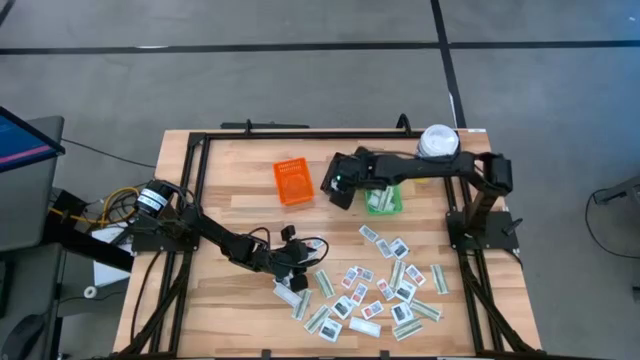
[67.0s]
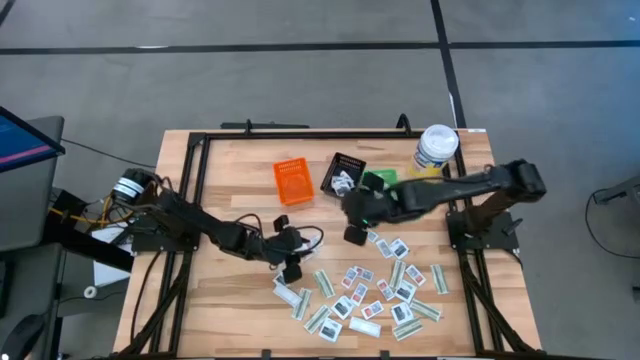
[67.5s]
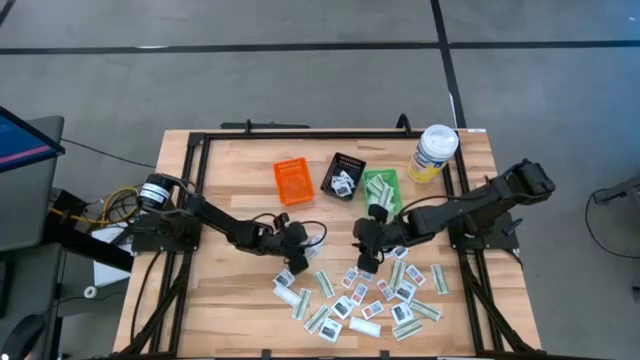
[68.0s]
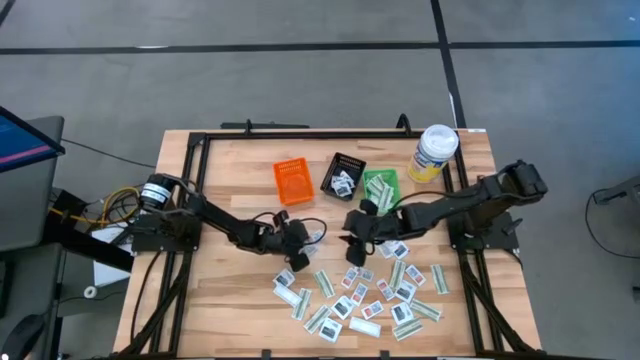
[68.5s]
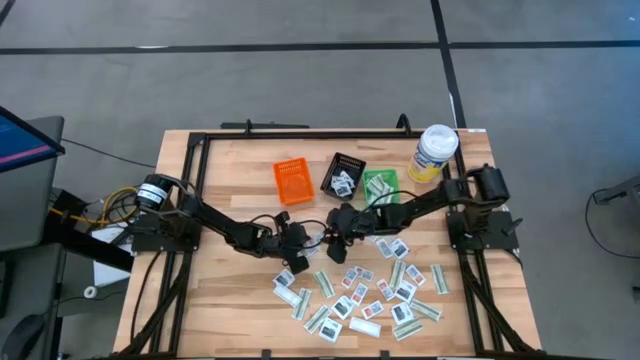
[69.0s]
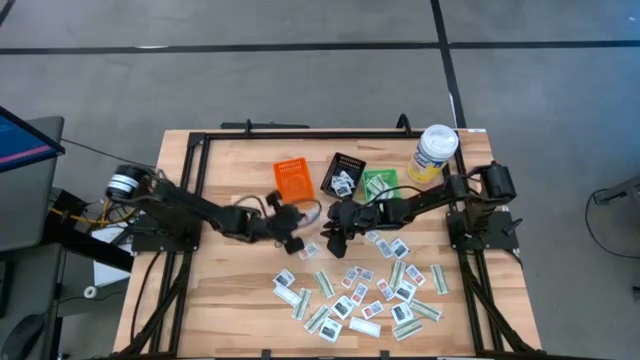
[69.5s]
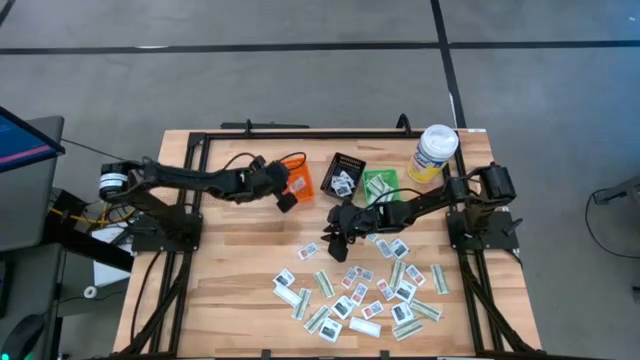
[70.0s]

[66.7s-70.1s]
Task: Pick & Place First Aid Supplies
Put the orange ointment pack into the orange basket

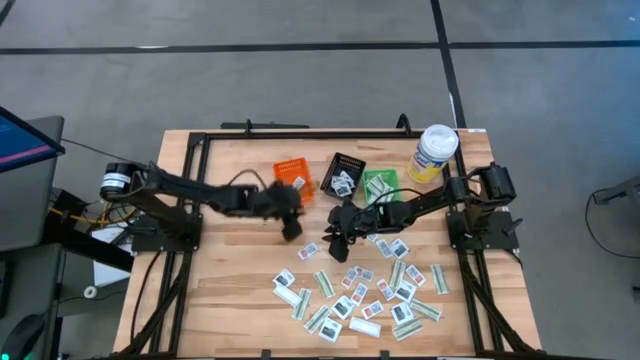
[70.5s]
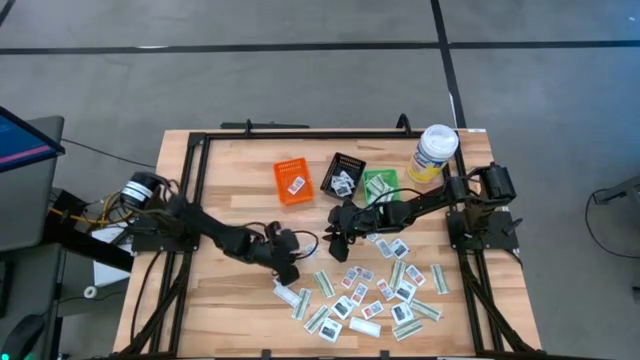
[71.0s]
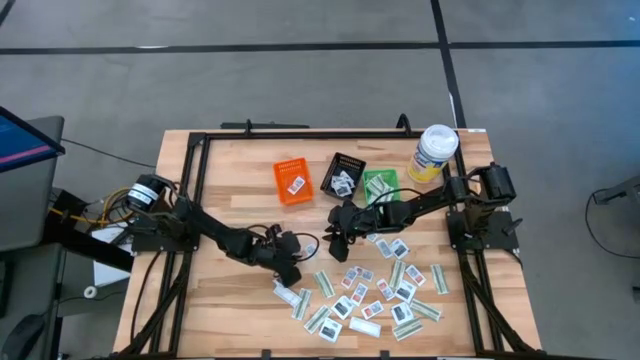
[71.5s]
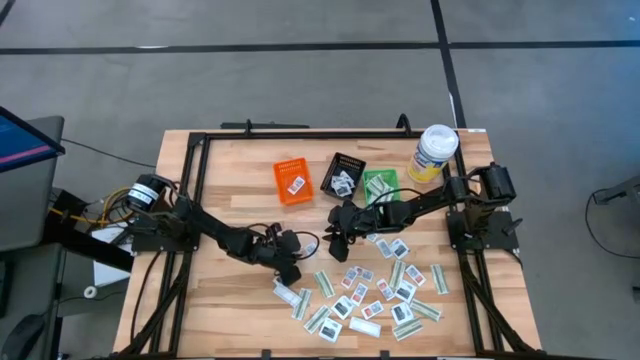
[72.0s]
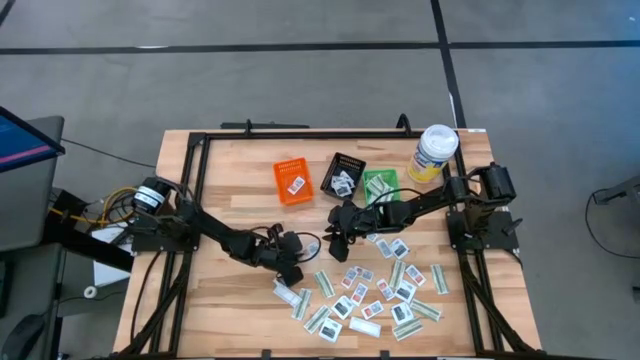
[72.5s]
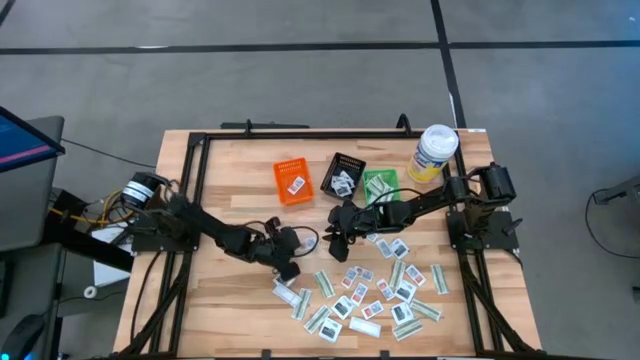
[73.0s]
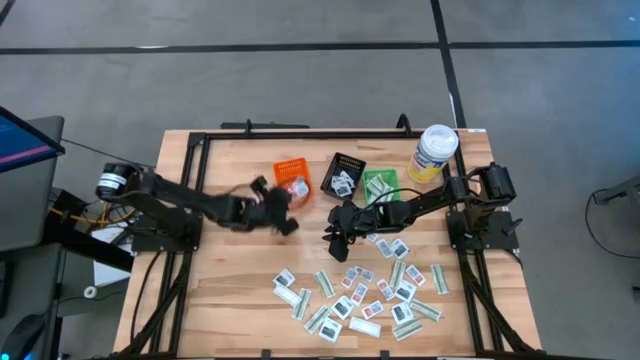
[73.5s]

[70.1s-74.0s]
Put the orange ointment pack into the orange basket

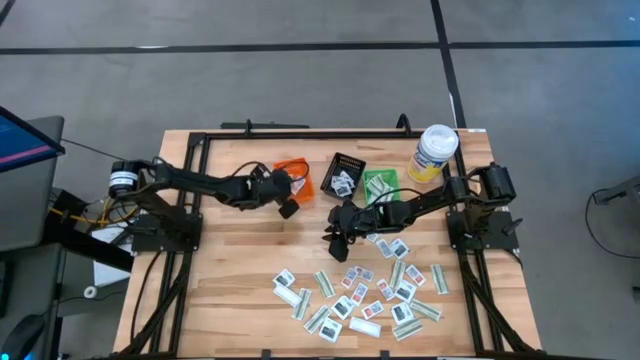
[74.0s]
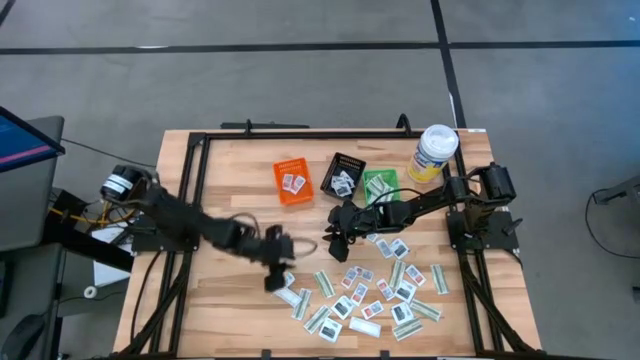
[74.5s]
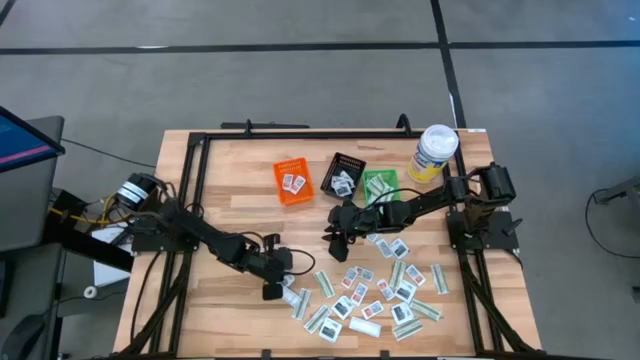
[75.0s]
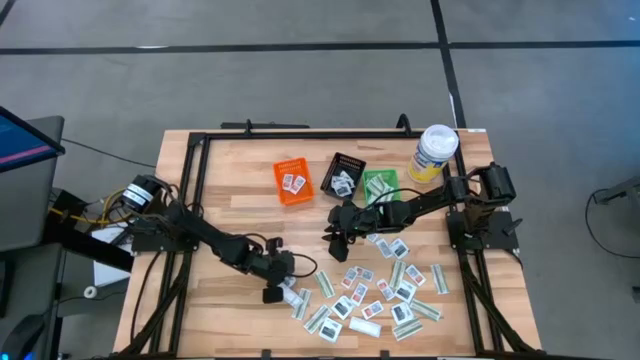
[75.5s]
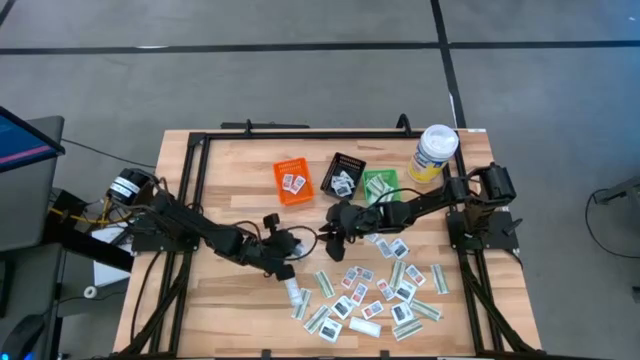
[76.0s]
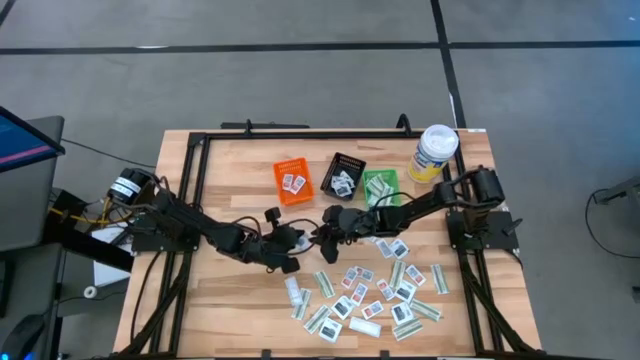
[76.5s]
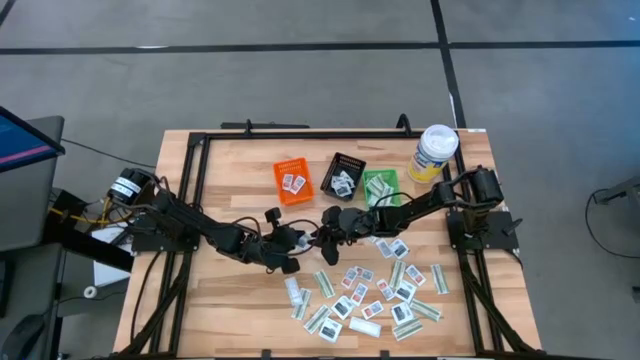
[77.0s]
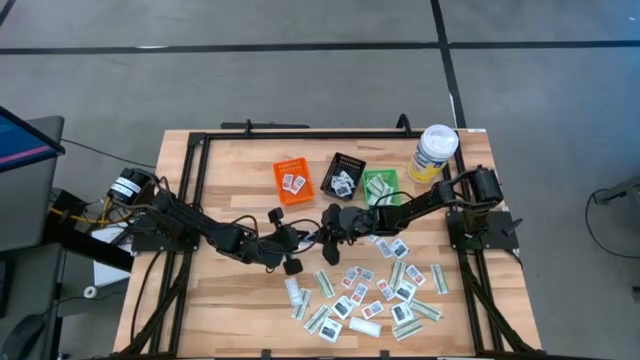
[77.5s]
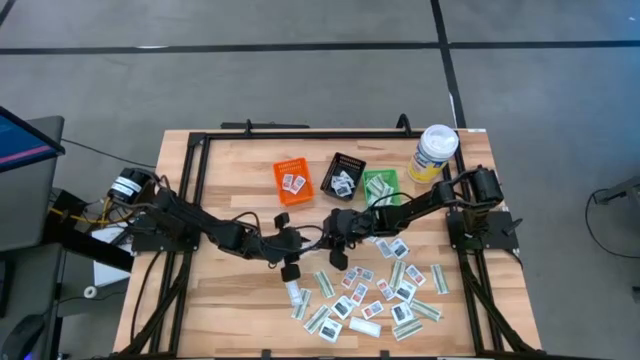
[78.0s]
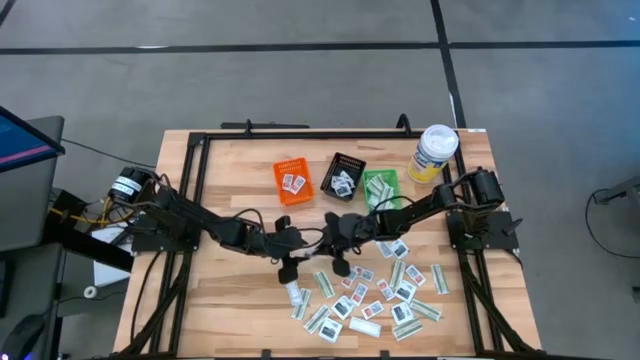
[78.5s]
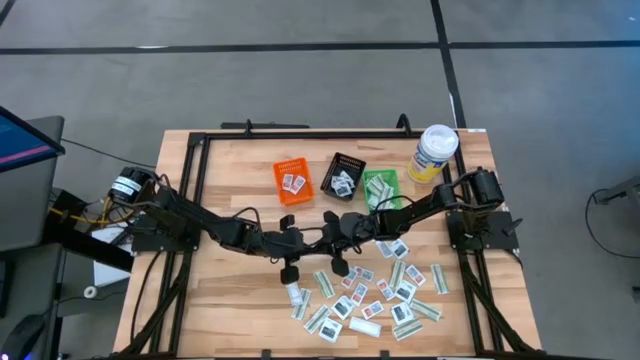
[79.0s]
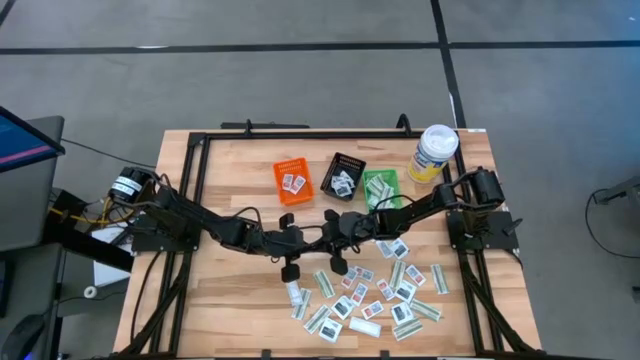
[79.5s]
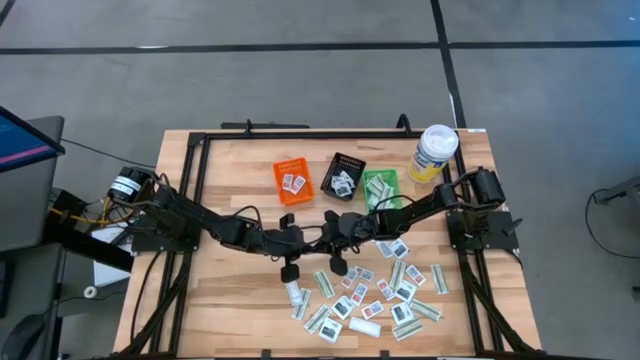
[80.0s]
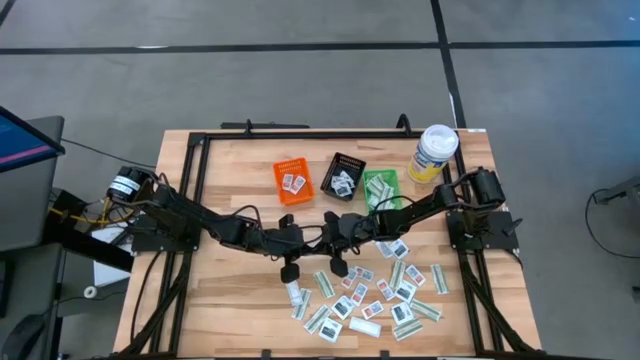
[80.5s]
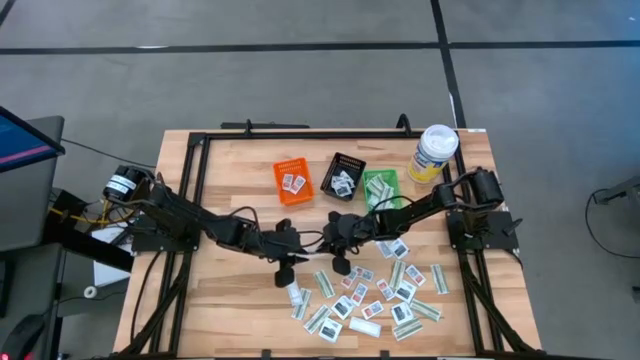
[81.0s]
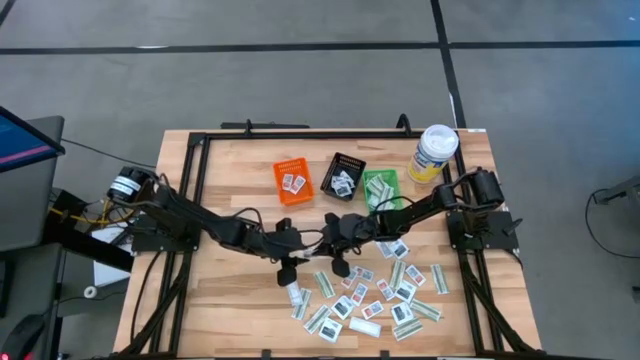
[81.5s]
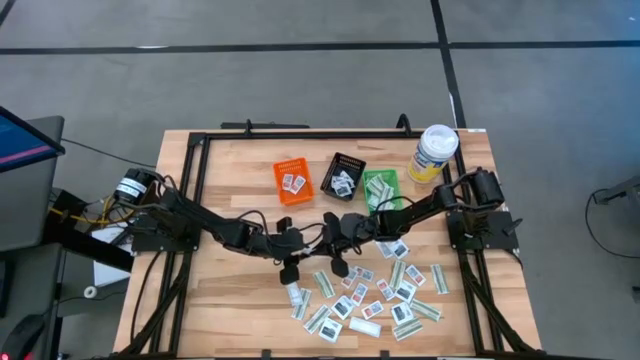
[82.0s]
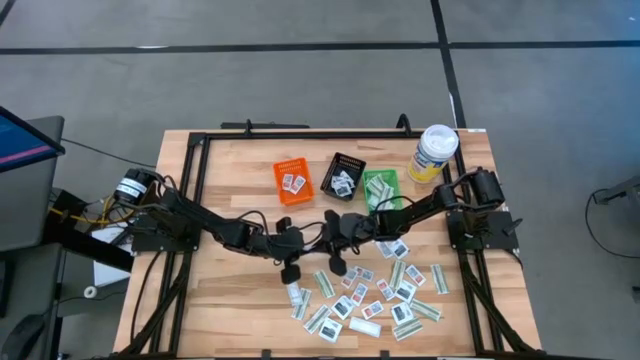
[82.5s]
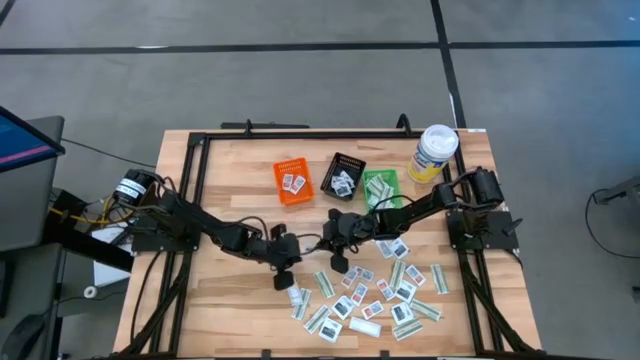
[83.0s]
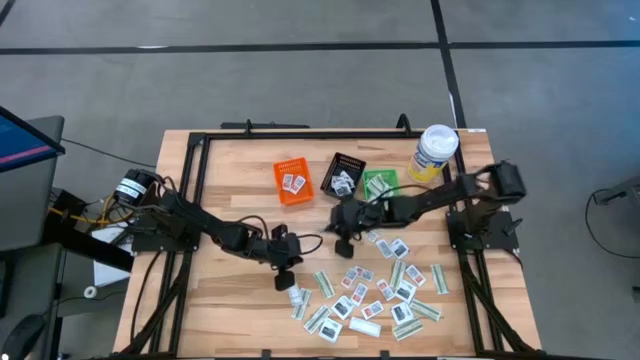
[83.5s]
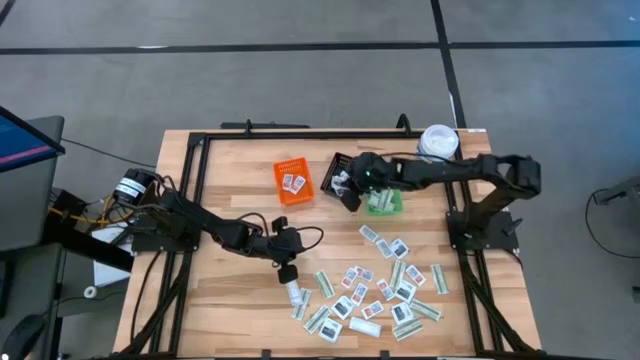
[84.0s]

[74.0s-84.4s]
Put the black towelette pack into the black basket

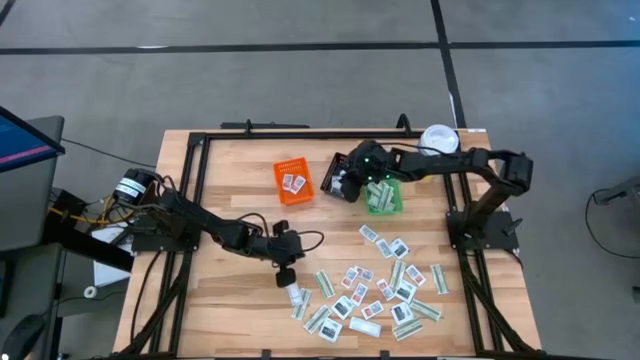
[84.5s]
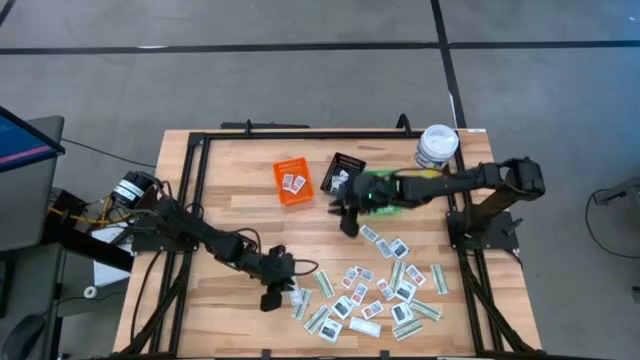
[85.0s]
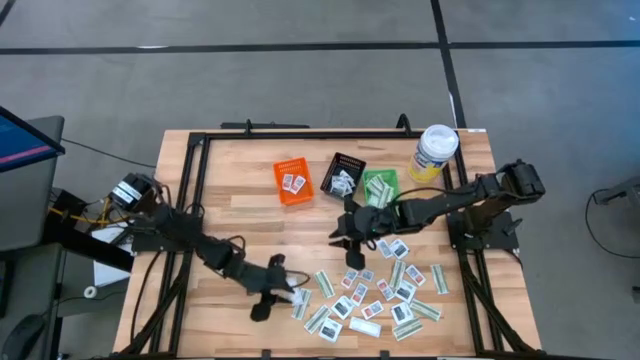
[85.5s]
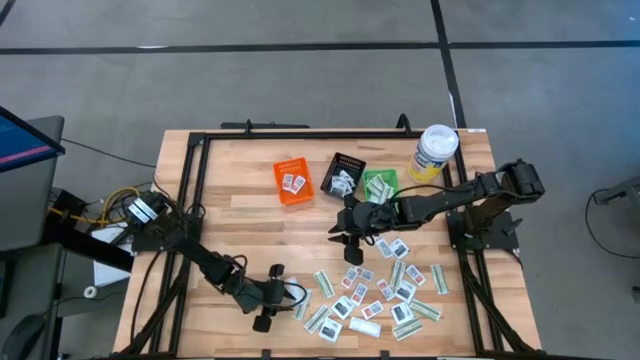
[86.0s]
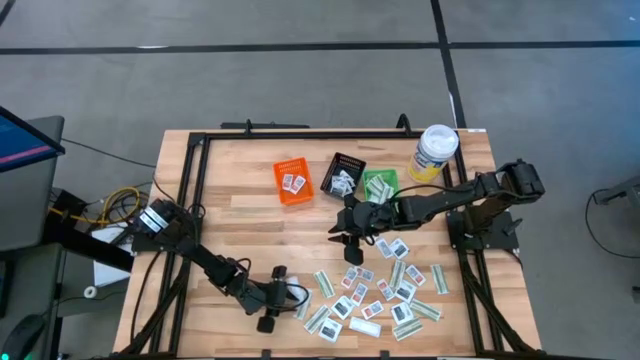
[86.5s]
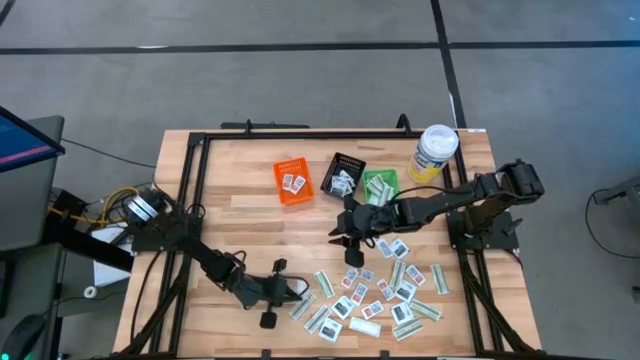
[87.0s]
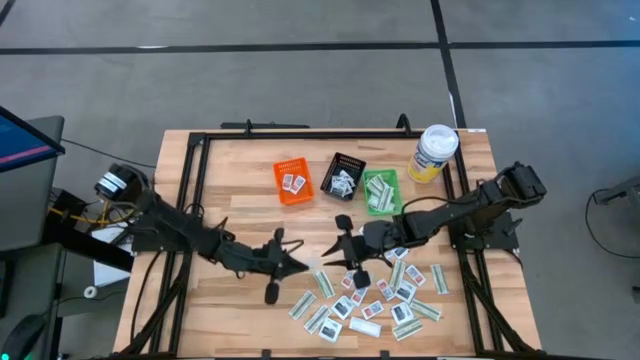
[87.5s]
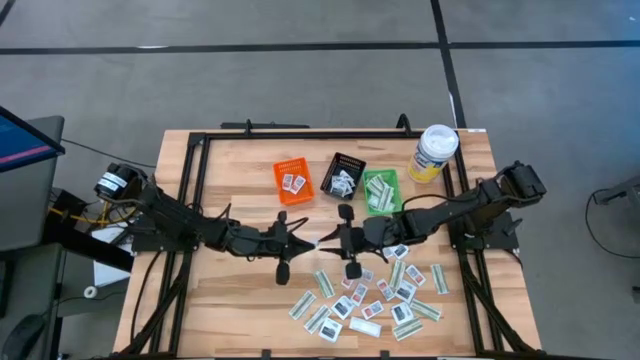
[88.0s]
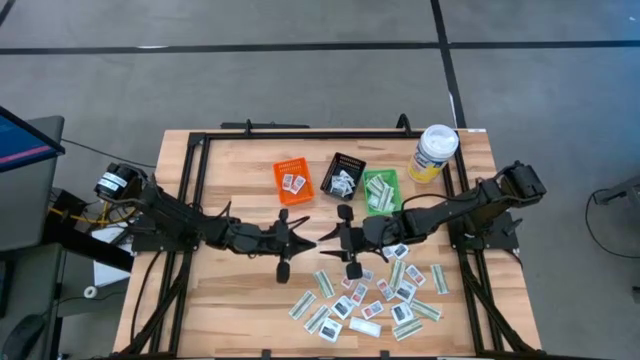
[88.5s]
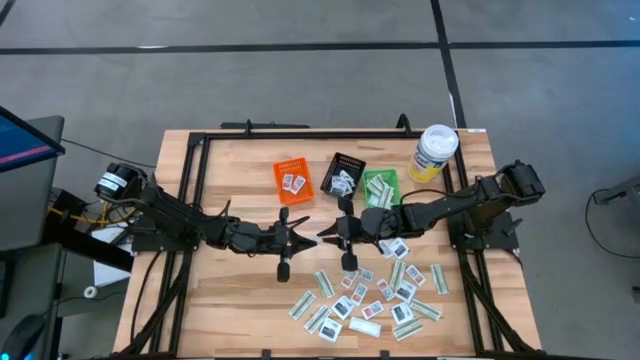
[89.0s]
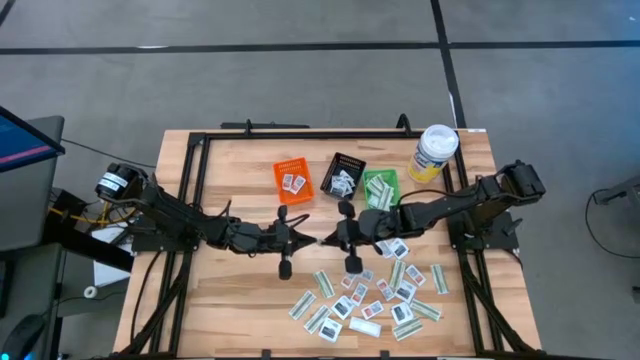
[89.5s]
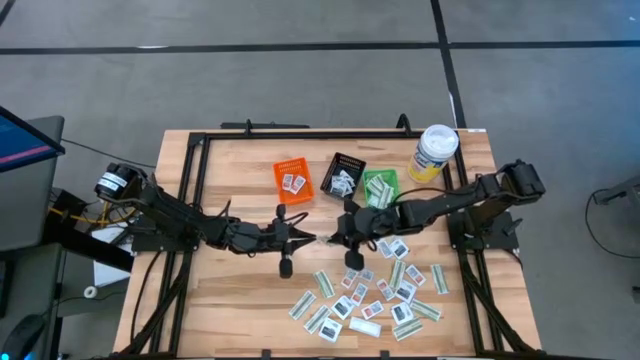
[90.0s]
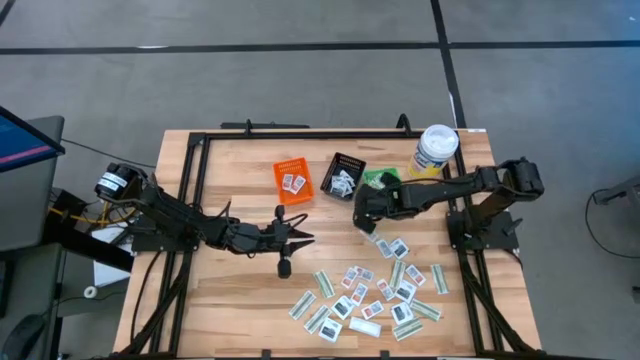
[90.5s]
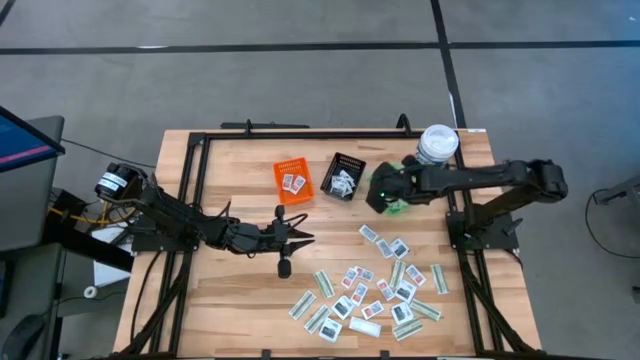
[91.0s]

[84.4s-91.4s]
Put the green bandage pack into the green basket
